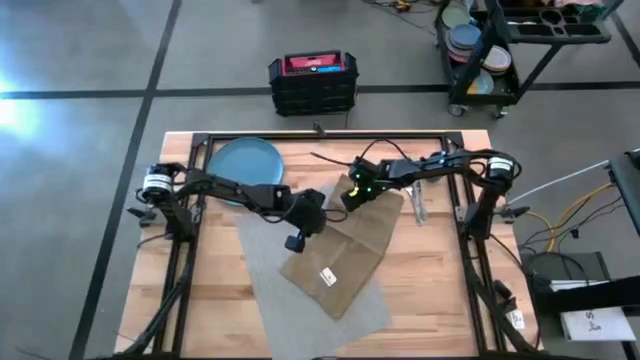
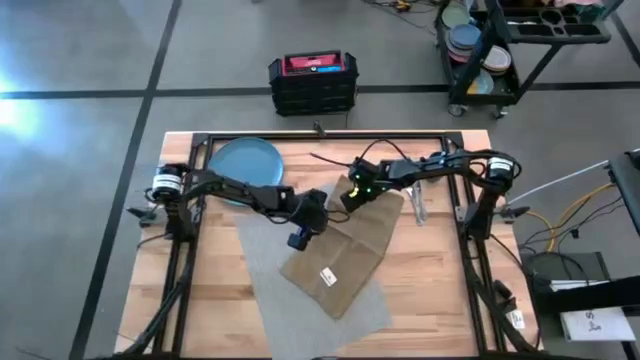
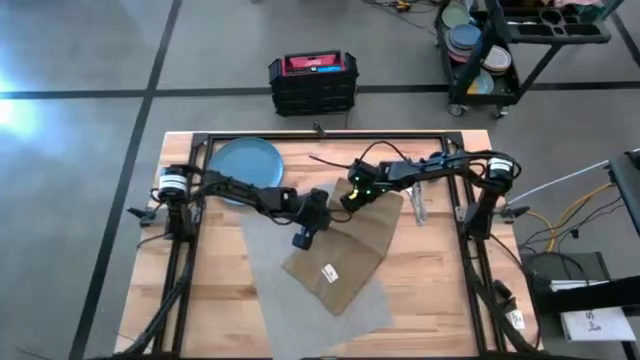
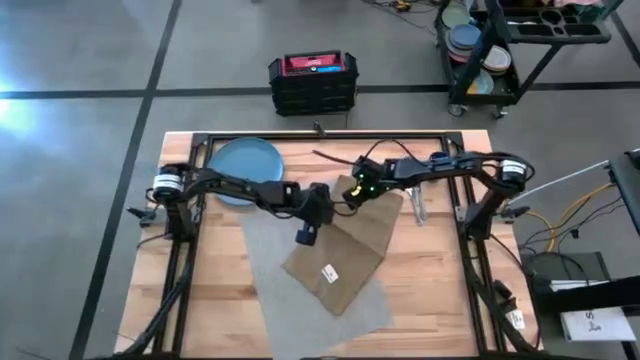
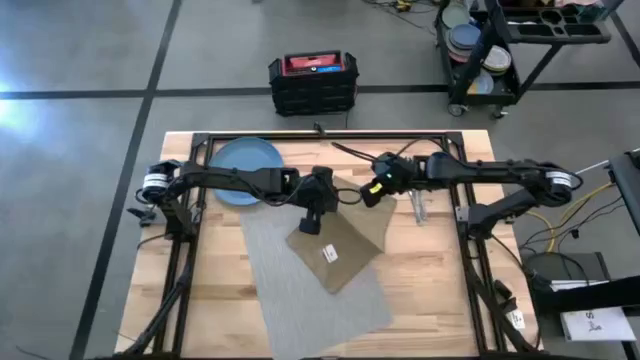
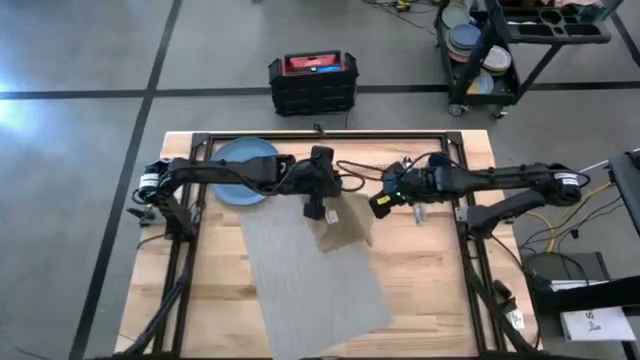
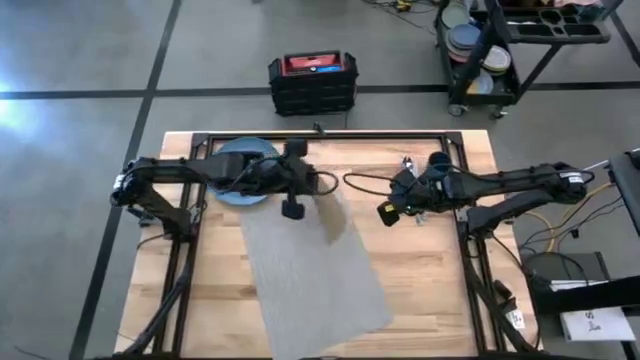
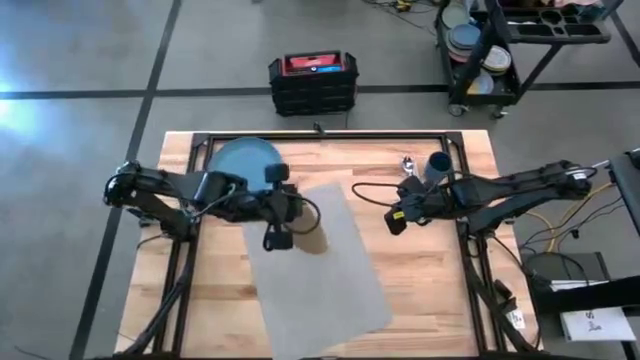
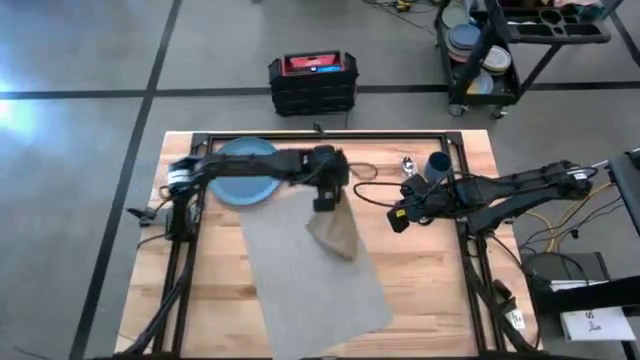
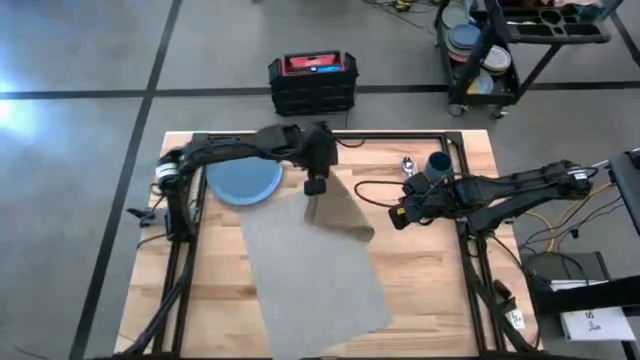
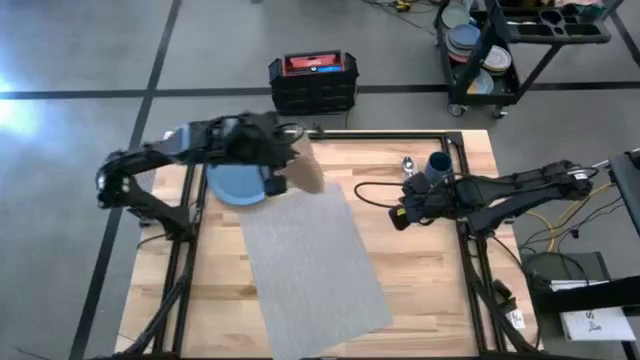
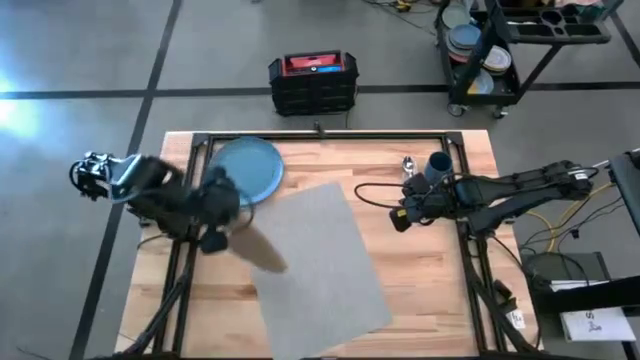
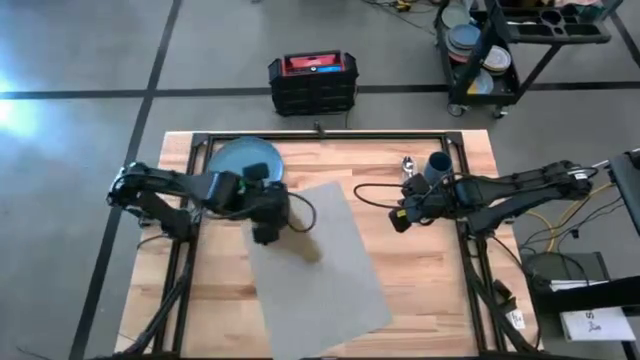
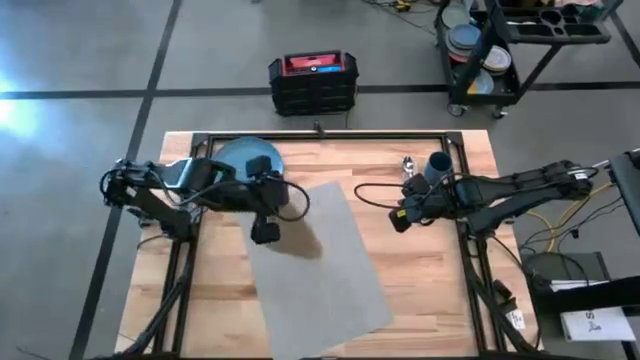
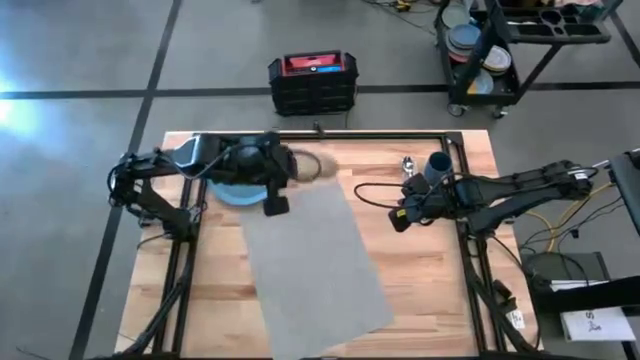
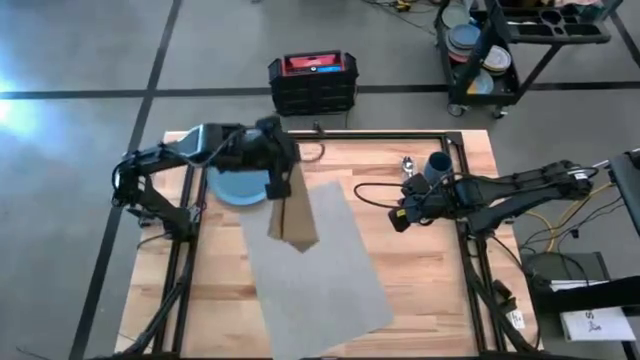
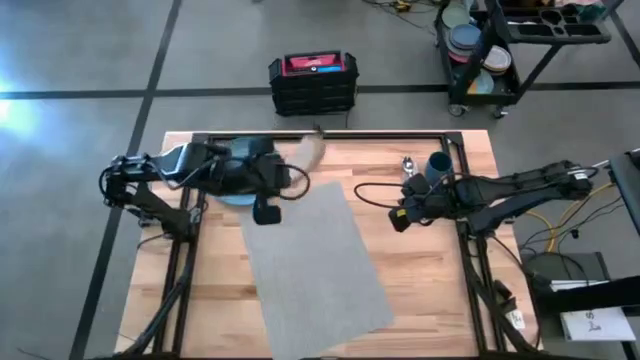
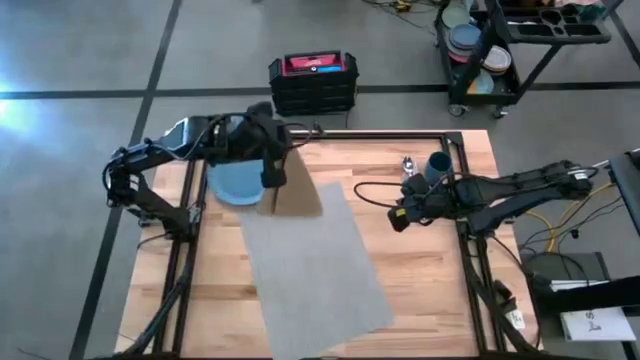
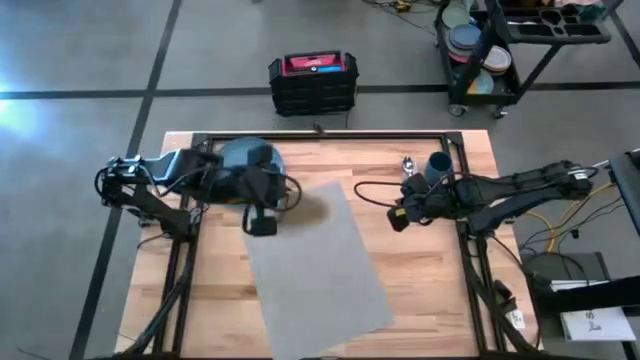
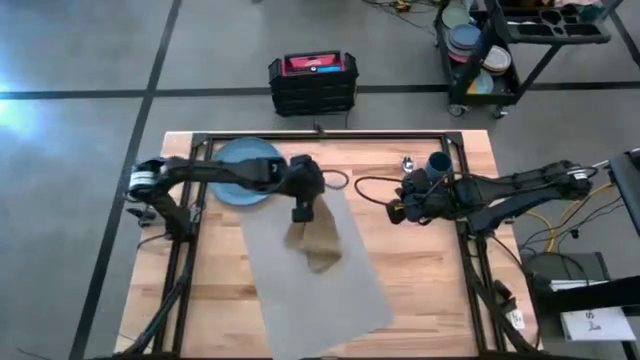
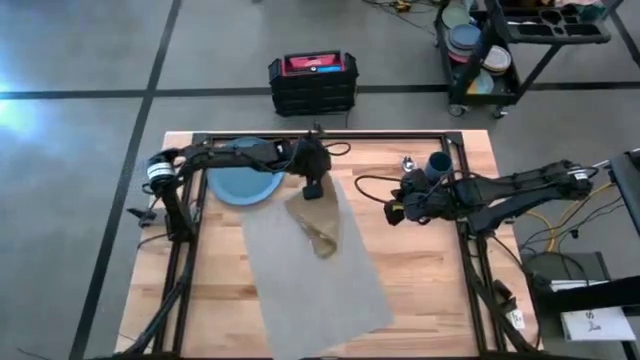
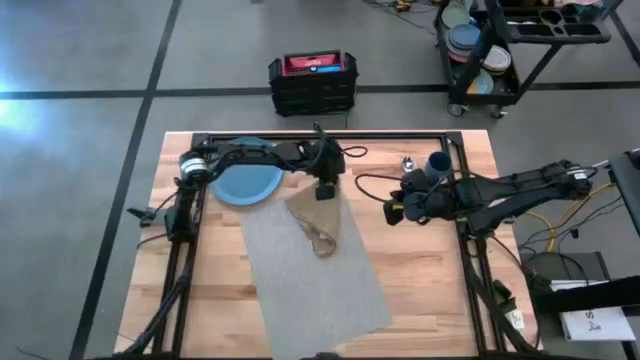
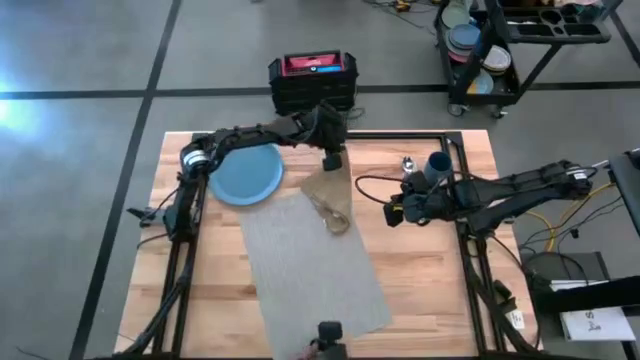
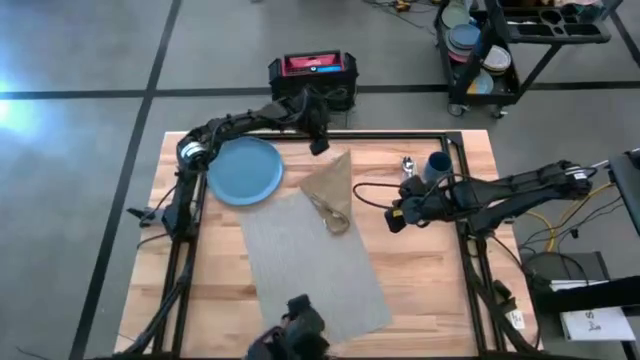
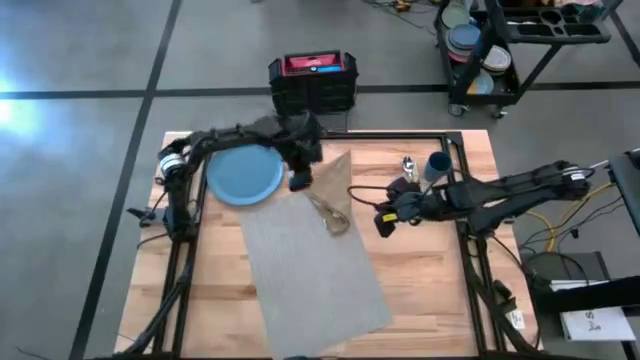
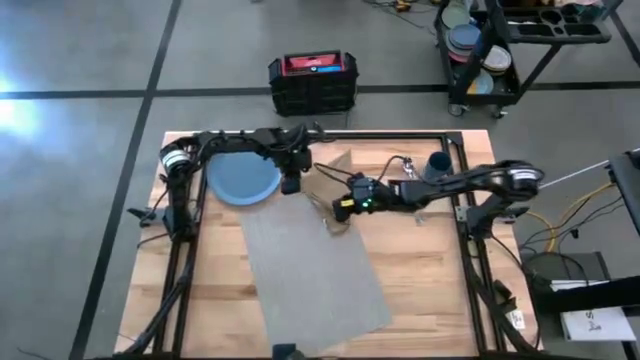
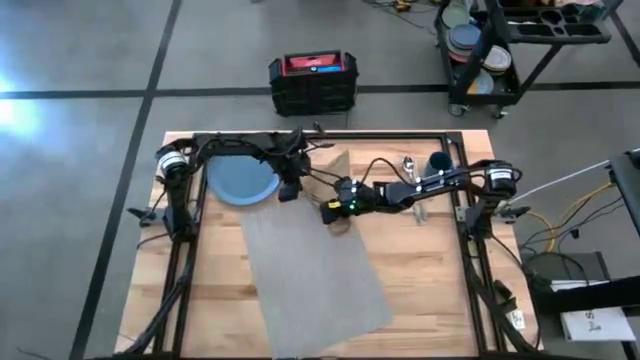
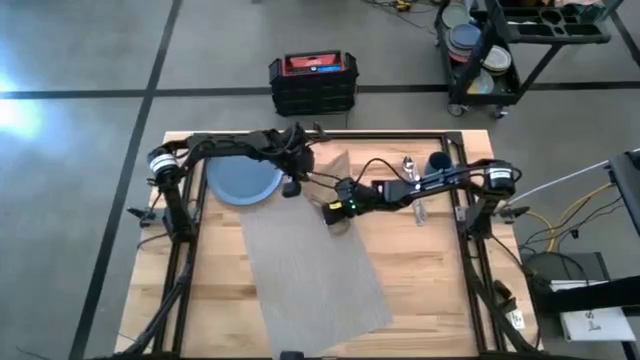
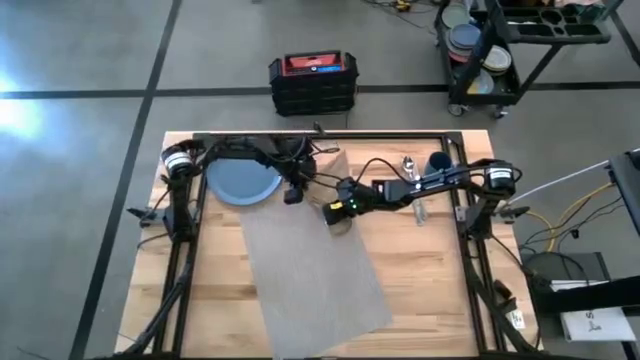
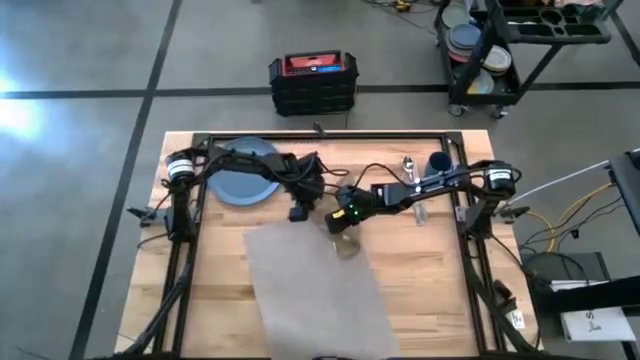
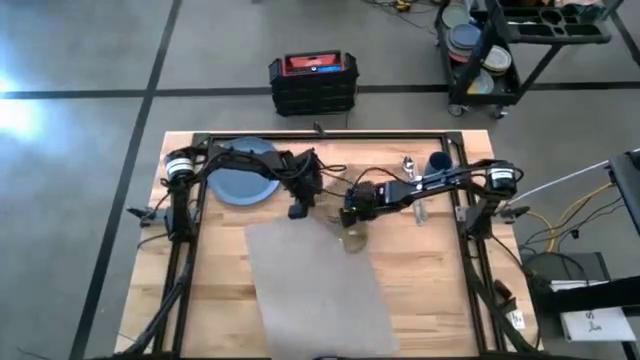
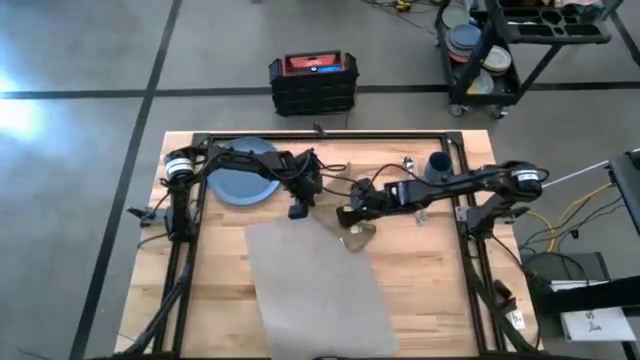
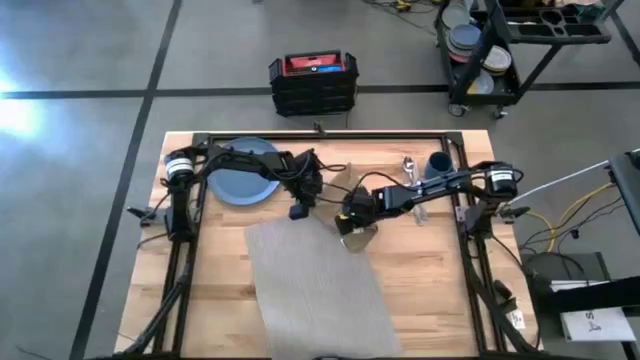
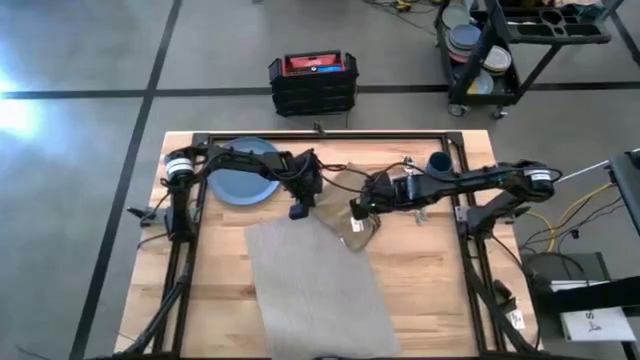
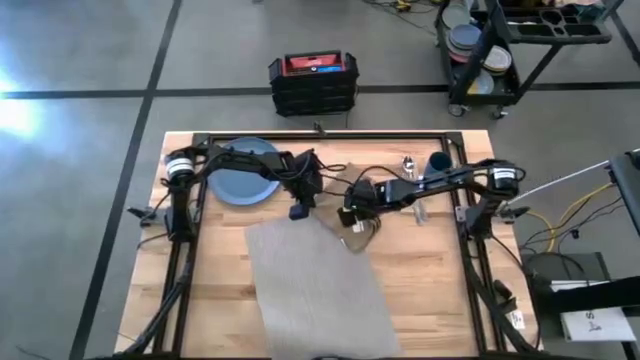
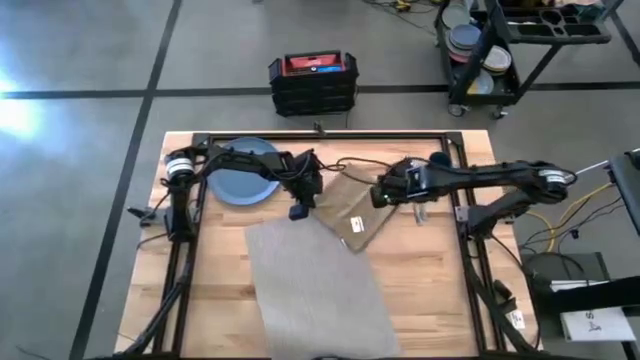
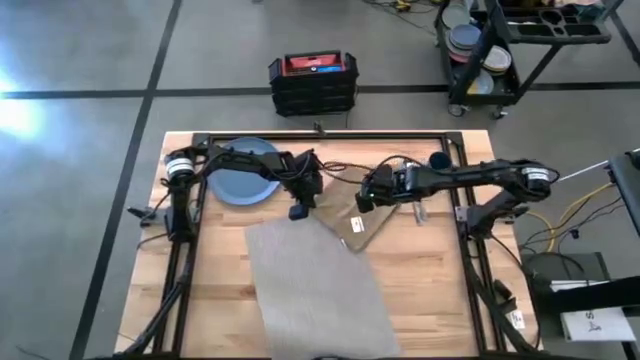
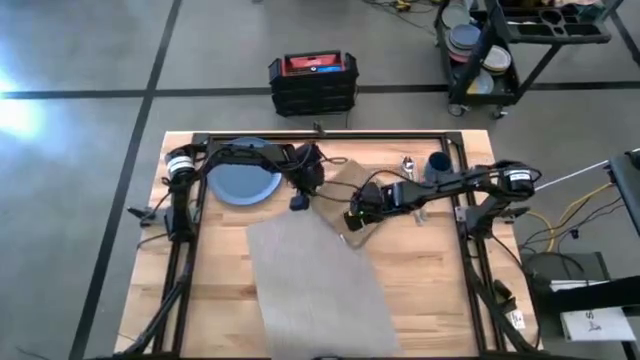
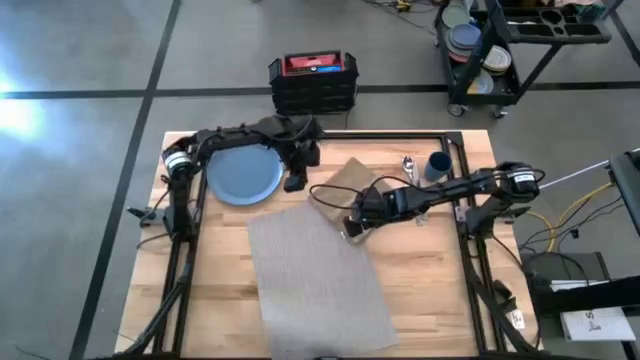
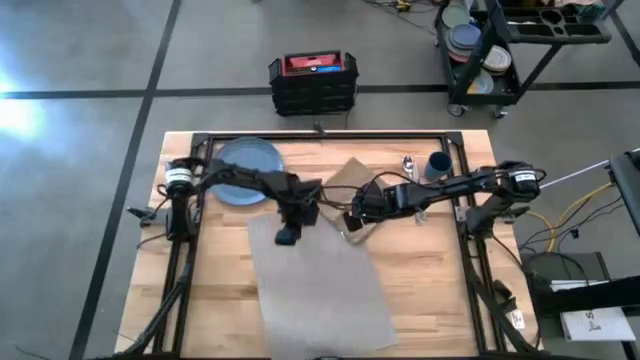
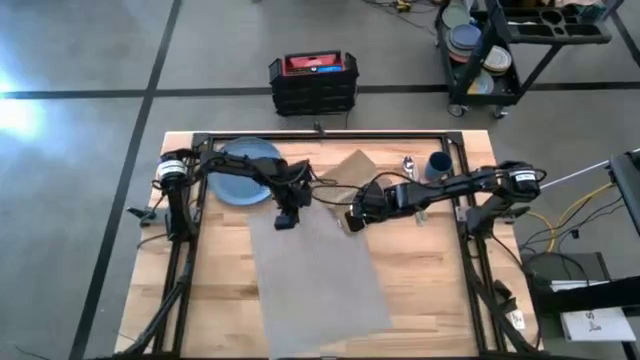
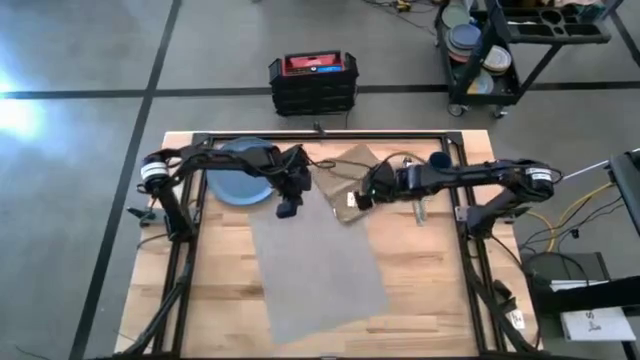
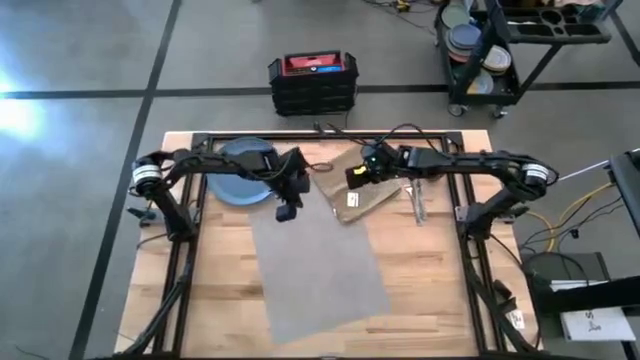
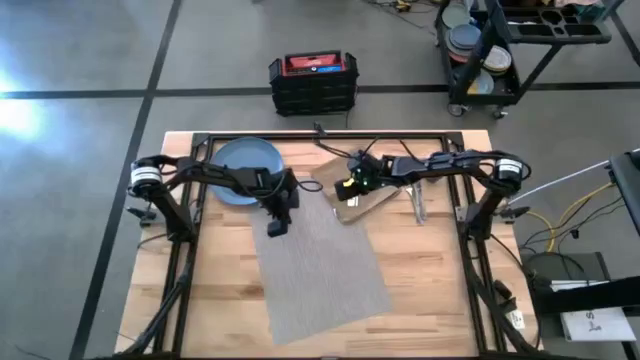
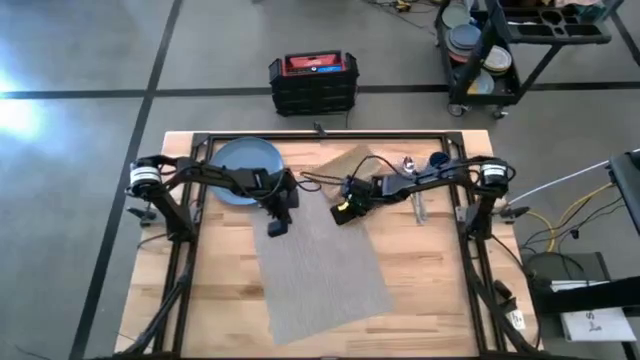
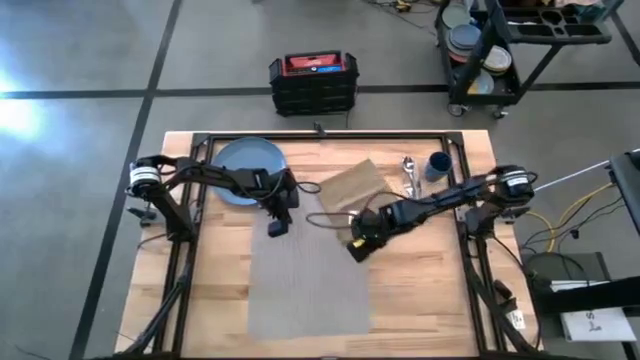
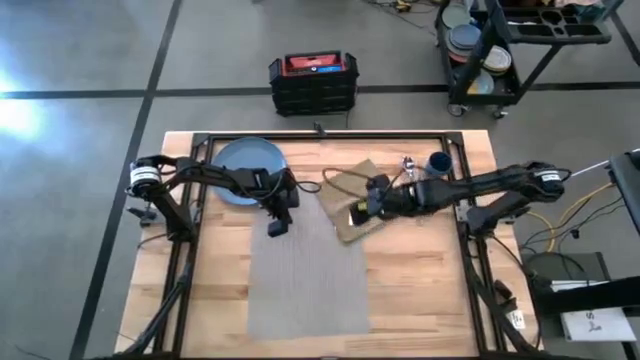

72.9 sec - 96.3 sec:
Task: Set table place
Fold the brown table napkin
